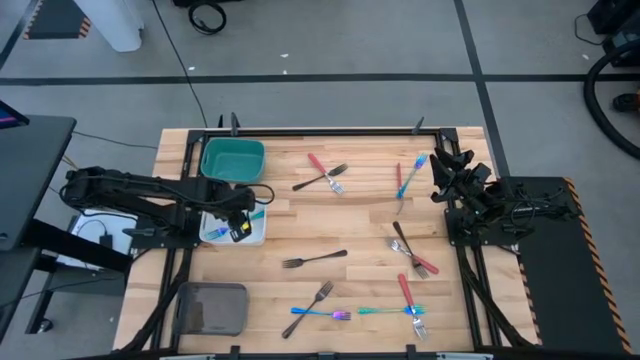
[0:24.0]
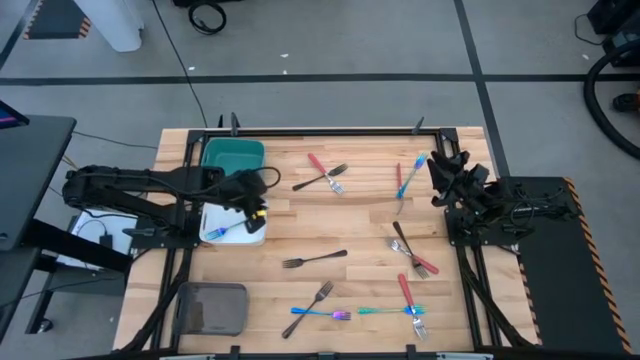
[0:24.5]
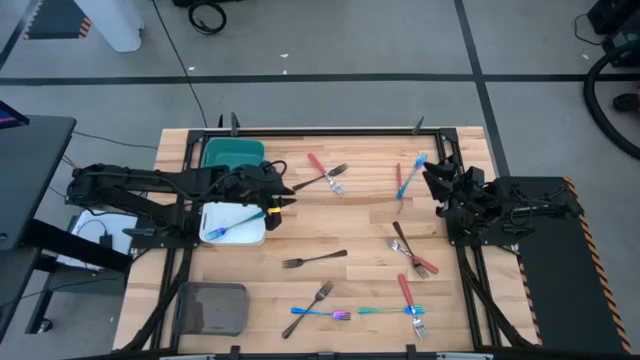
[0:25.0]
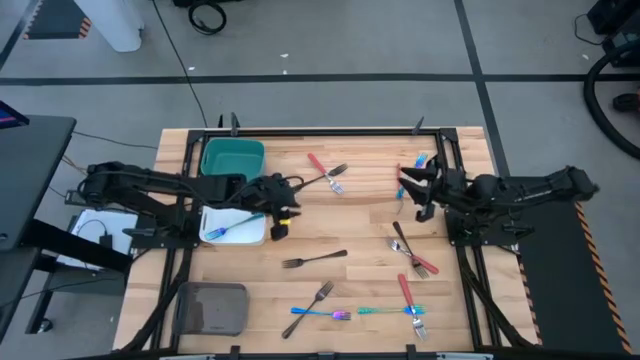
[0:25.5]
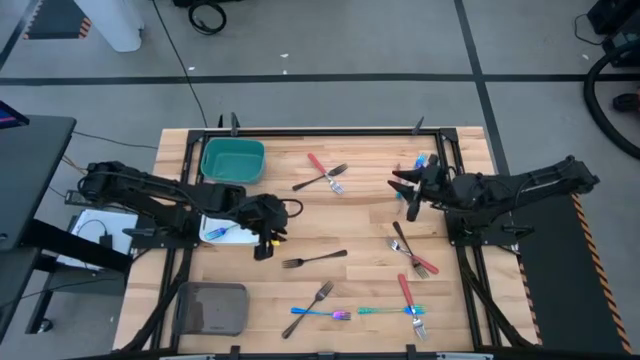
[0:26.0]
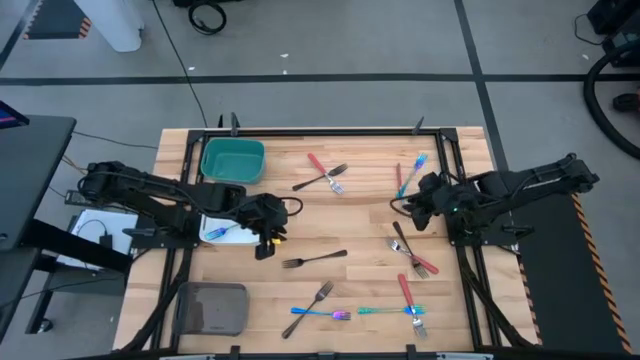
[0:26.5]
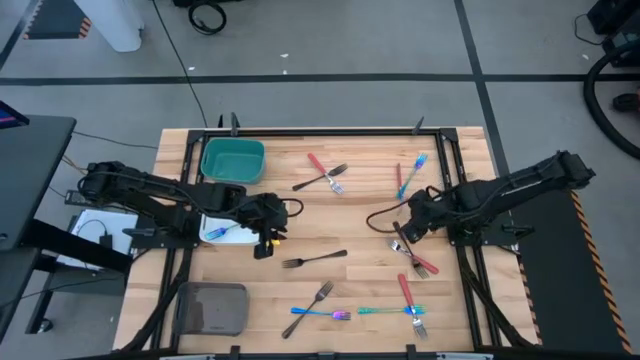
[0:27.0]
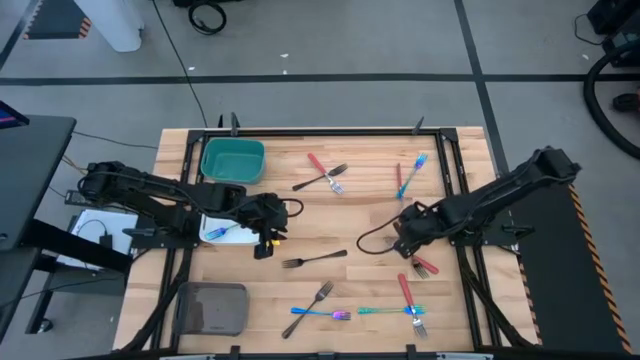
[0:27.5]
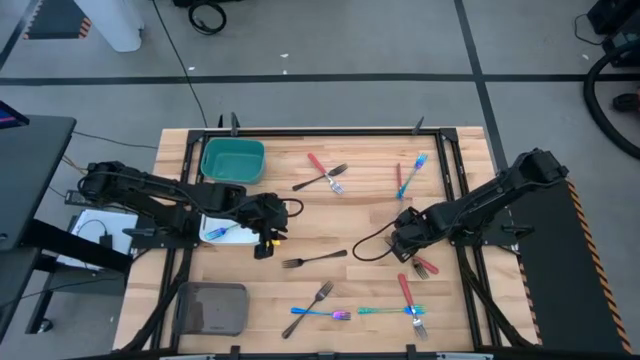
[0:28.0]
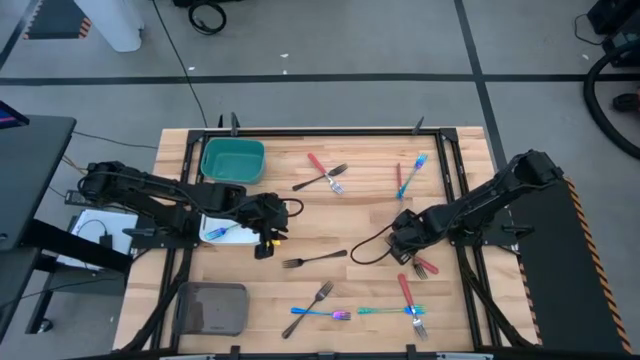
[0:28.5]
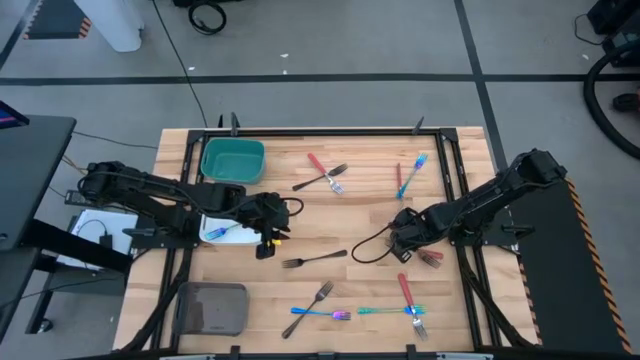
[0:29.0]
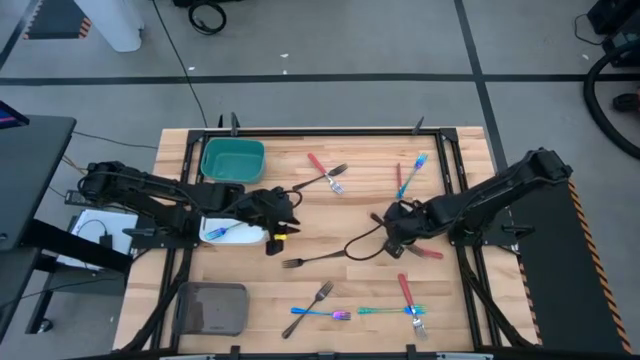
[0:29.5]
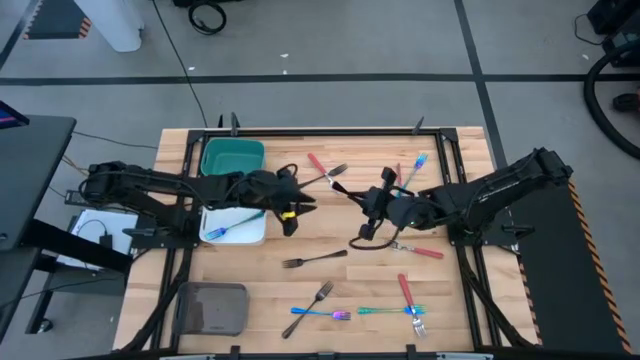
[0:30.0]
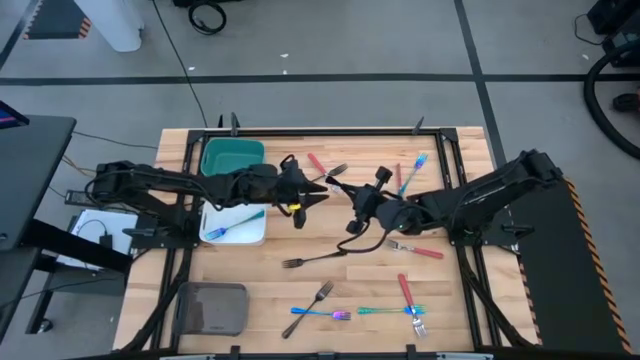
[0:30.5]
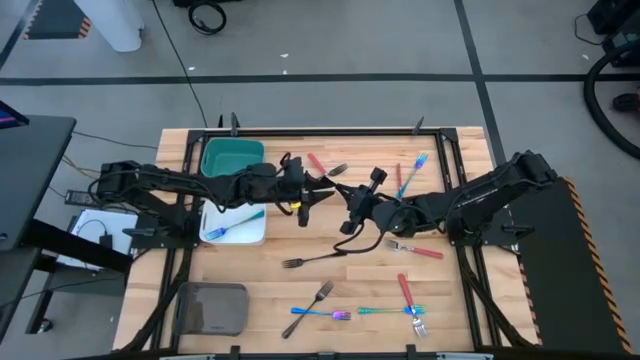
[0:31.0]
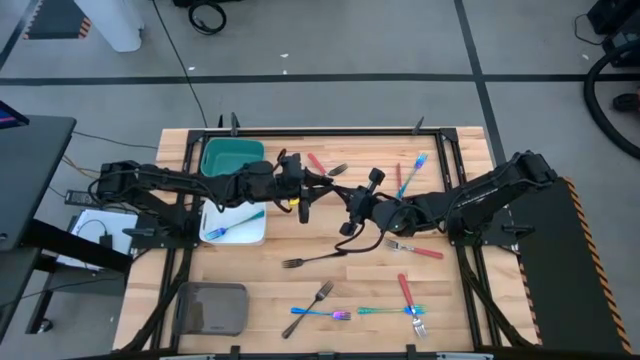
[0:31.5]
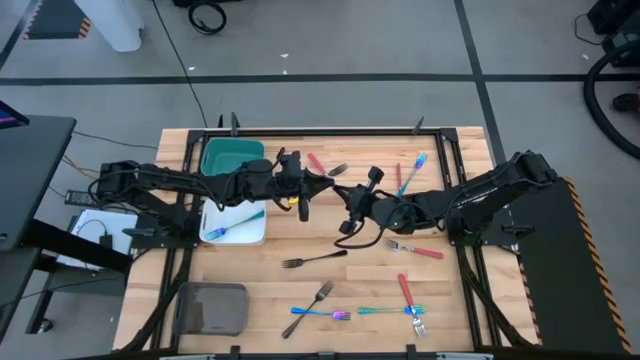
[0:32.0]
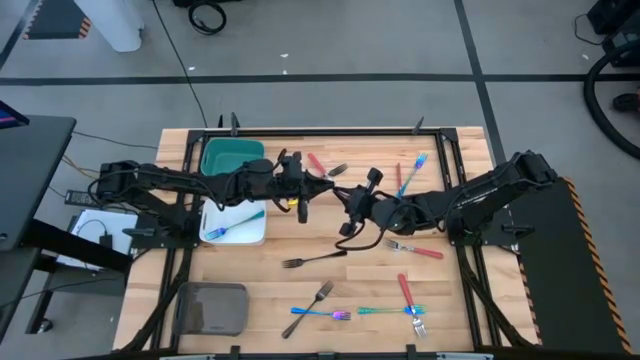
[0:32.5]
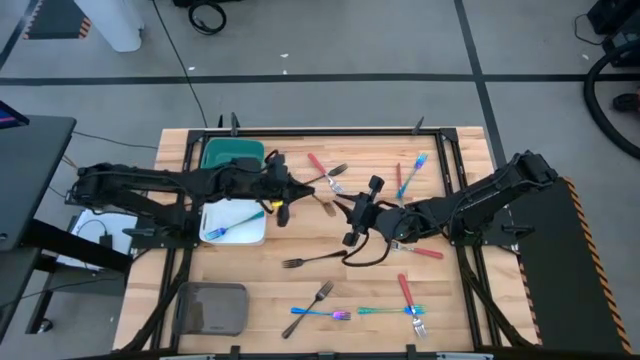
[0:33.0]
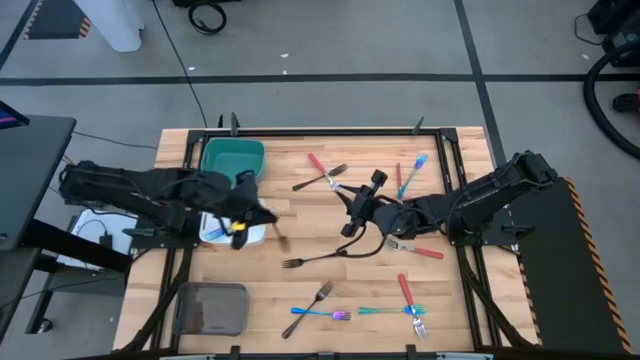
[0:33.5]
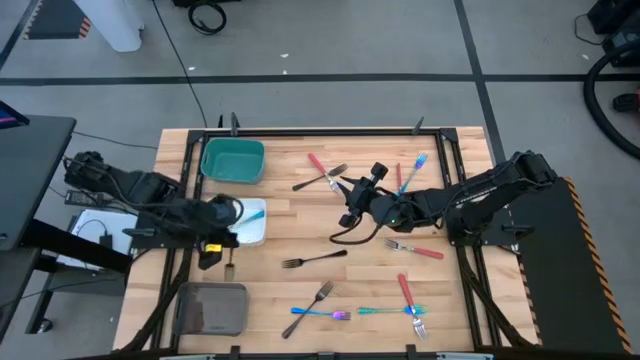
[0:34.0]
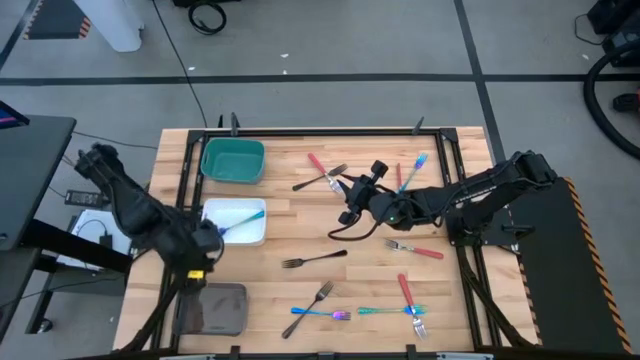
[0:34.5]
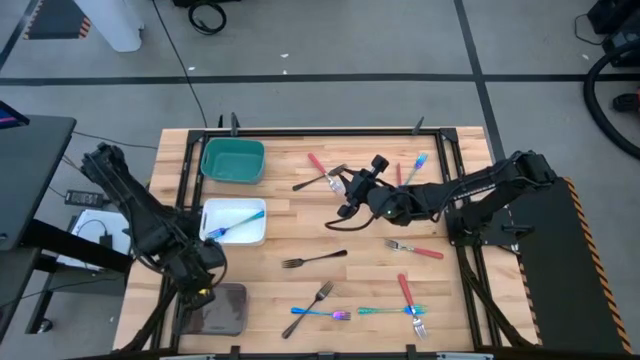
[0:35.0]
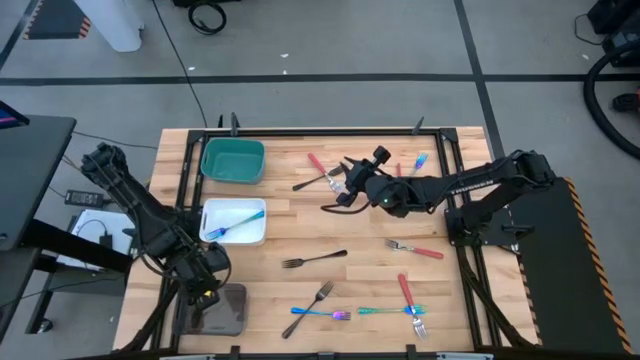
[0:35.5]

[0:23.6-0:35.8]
Task: Sort silverware by color (type)
Put the black fork into the black bin

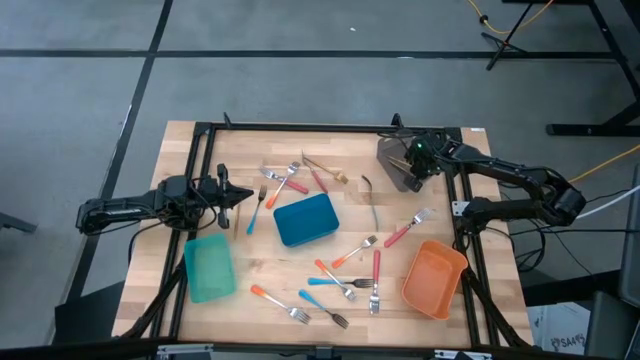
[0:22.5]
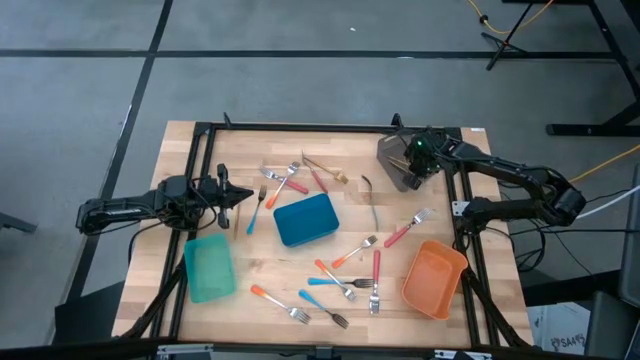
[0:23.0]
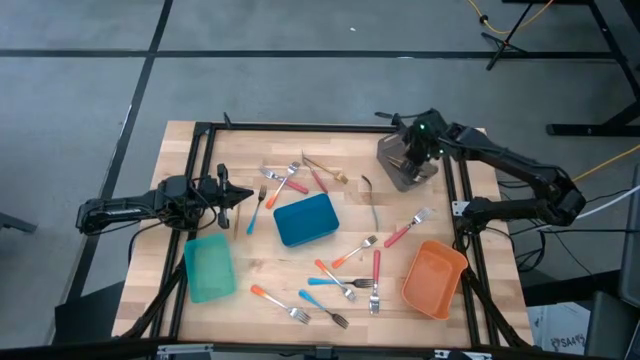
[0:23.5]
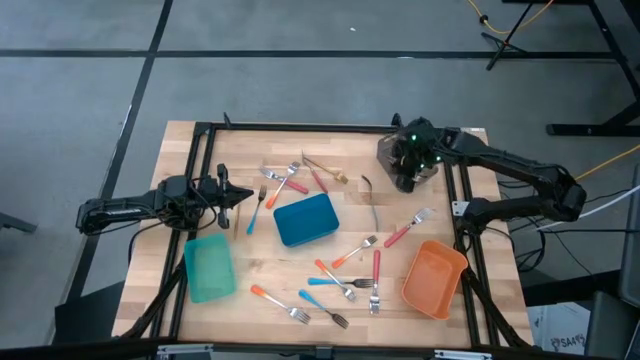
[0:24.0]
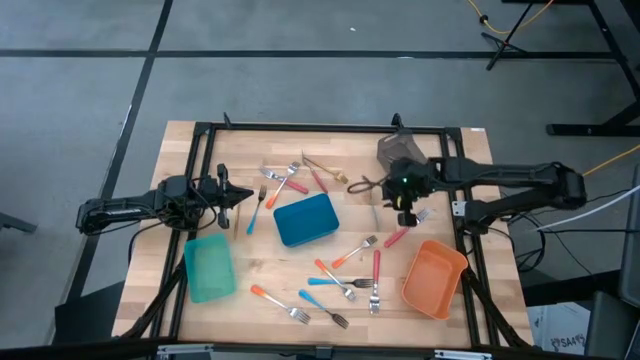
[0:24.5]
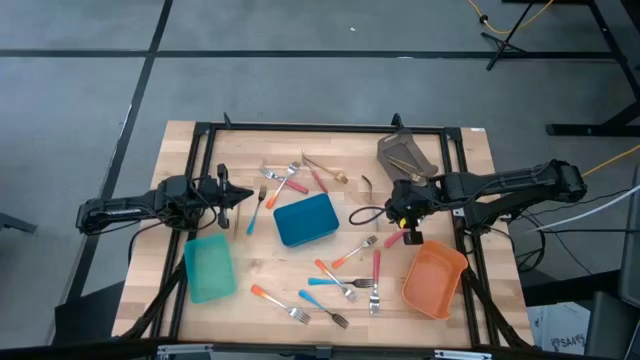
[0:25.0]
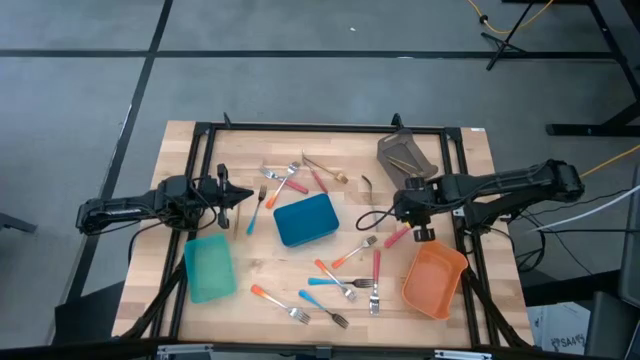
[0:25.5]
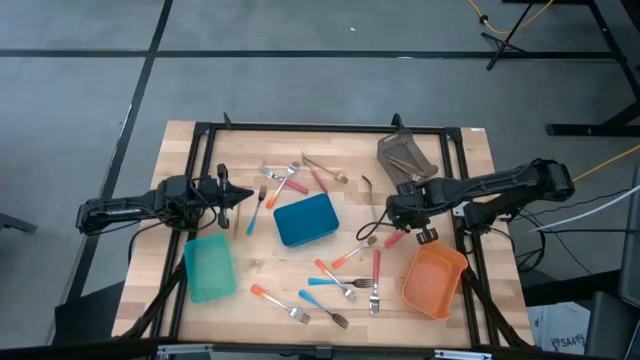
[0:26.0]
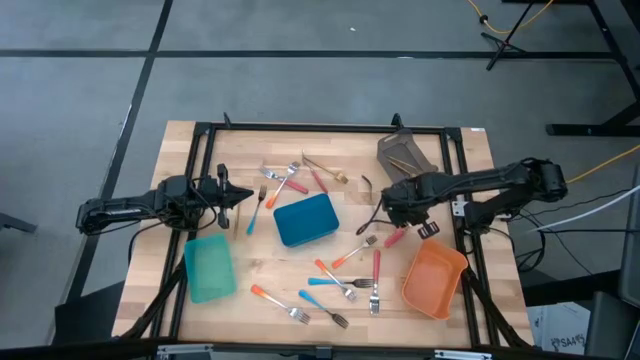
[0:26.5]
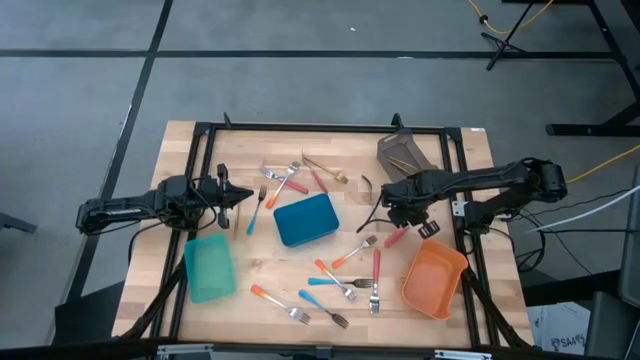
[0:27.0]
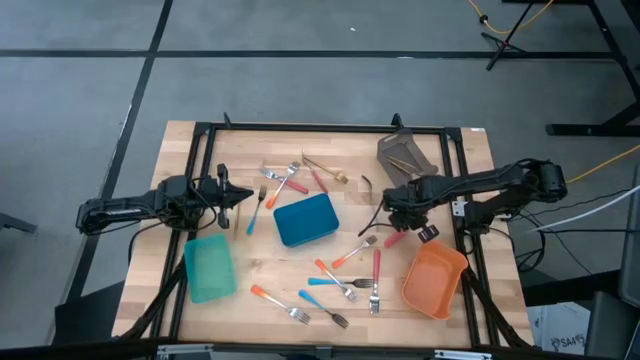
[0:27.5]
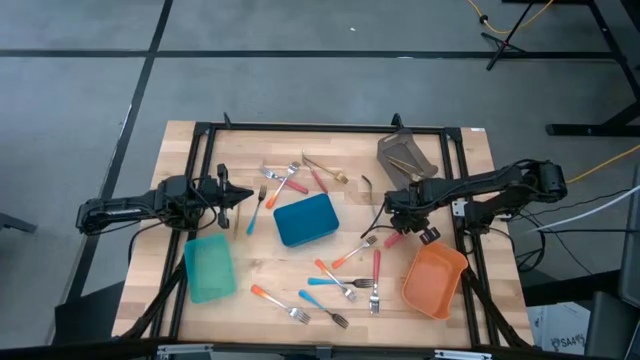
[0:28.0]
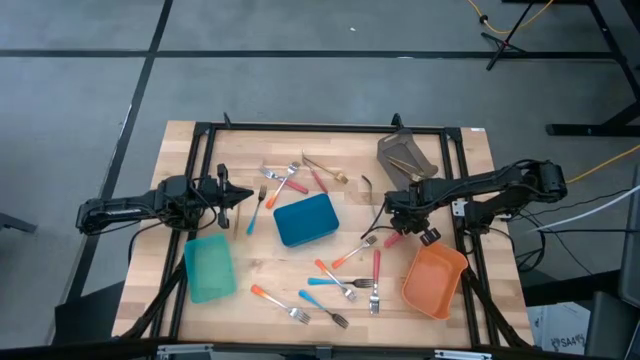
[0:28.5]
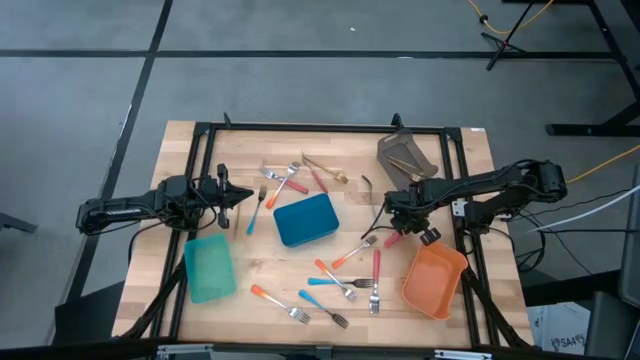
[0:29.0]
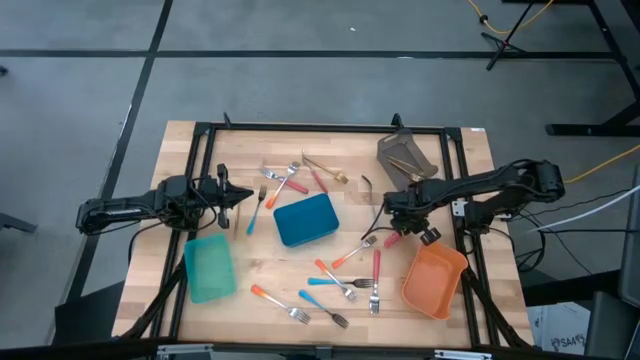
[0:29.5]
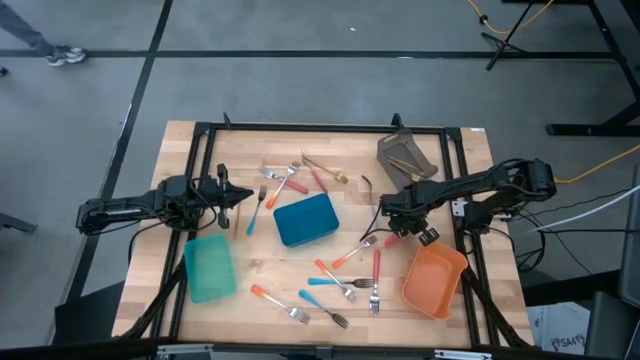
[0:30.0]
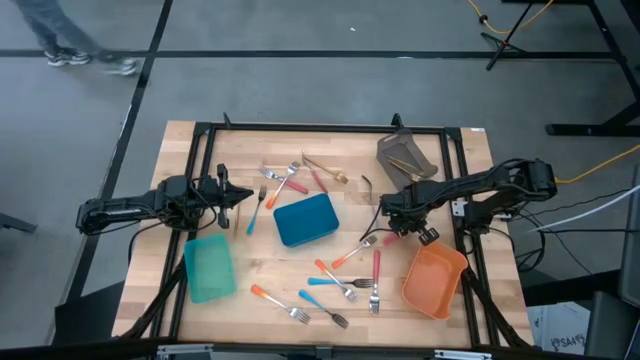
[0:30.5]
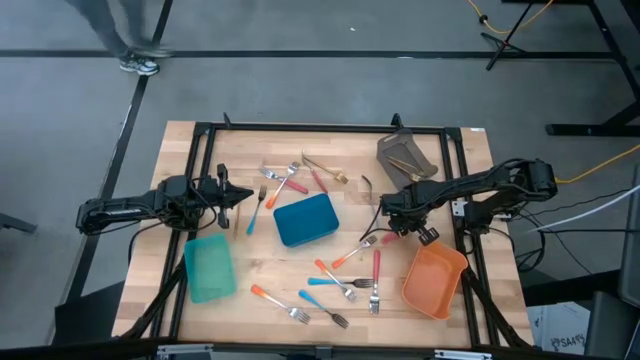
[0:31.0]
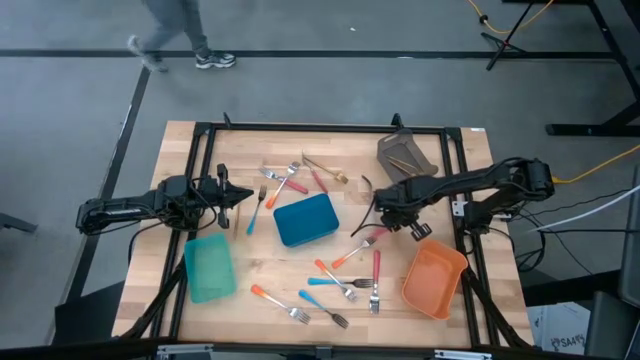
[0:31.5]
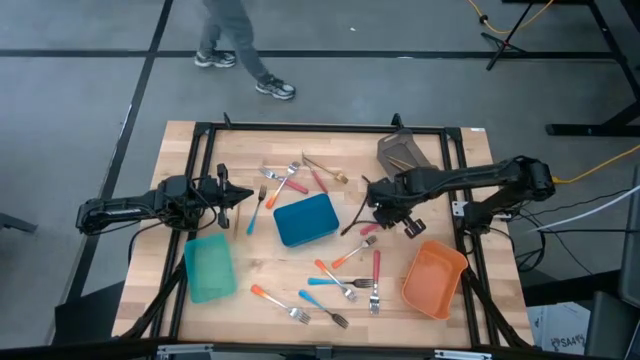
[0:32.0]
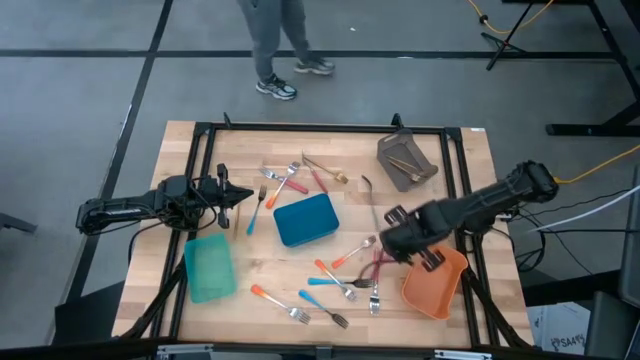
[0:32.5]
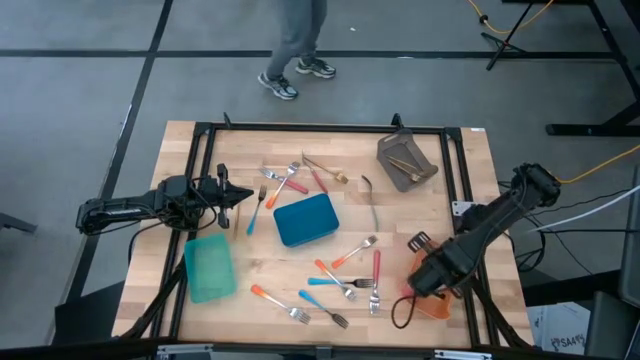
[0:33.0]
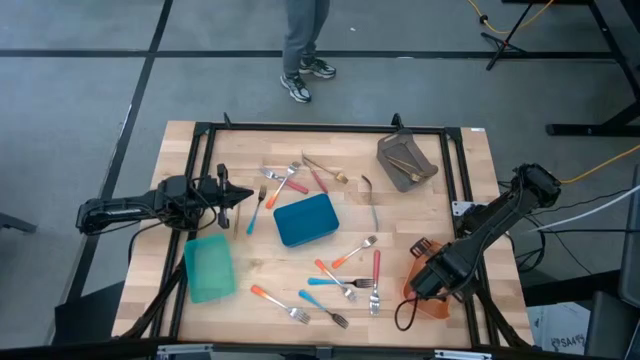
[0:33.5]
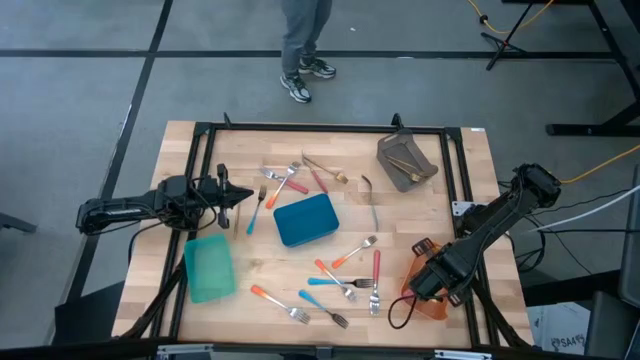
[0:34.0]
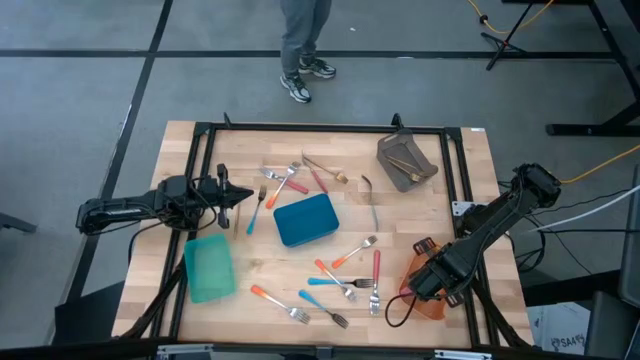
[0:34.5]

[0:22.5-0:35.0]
Task: Sort silverware by color (type)
Put the top right pink fork into the orange bin
